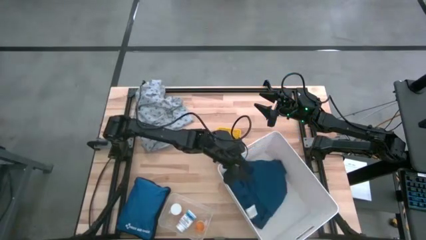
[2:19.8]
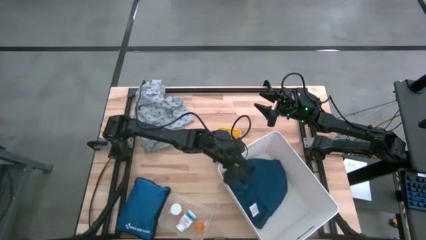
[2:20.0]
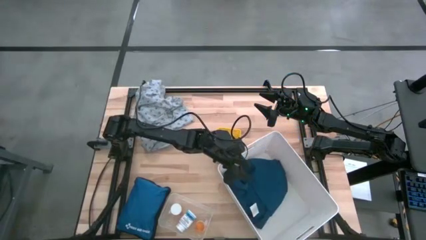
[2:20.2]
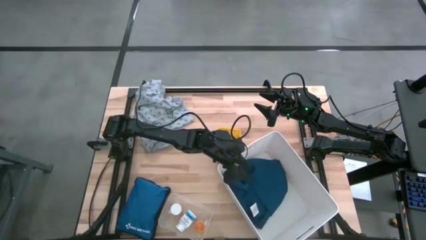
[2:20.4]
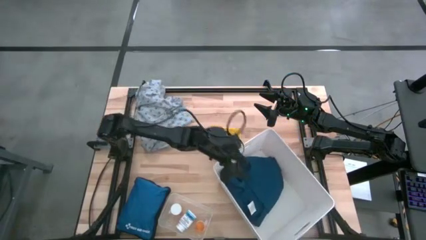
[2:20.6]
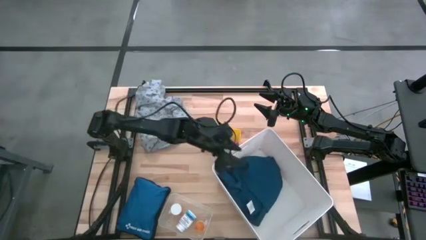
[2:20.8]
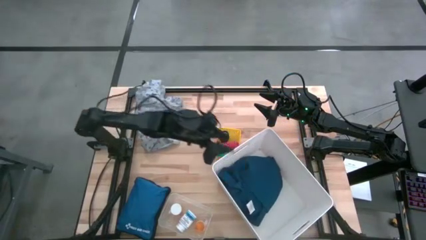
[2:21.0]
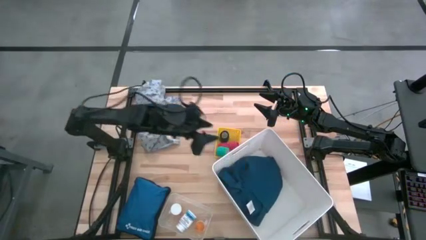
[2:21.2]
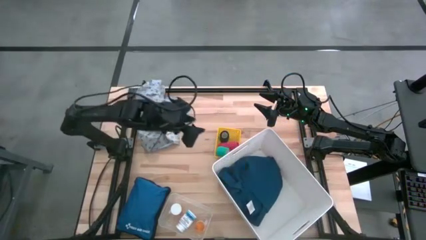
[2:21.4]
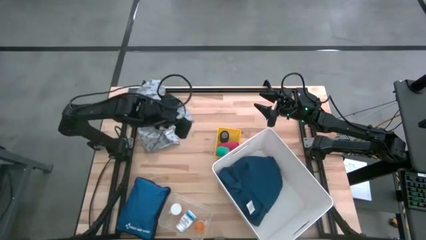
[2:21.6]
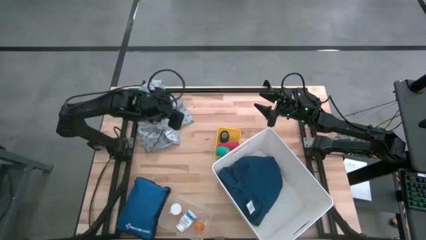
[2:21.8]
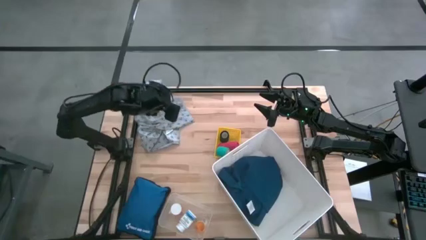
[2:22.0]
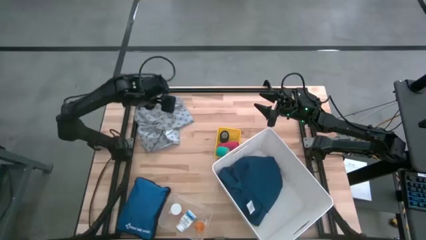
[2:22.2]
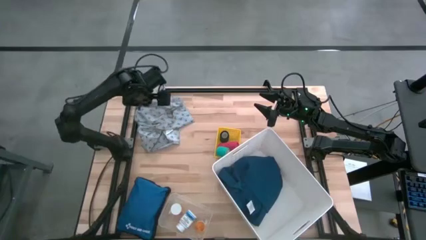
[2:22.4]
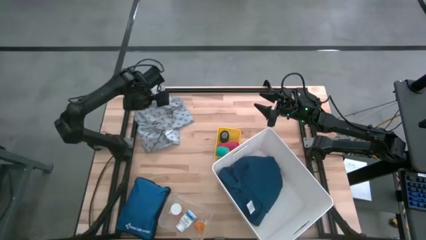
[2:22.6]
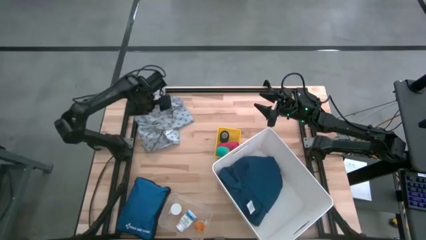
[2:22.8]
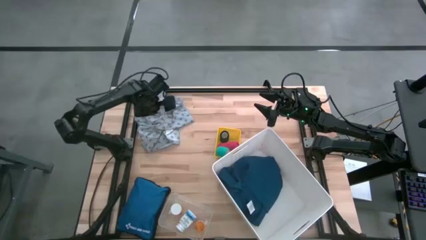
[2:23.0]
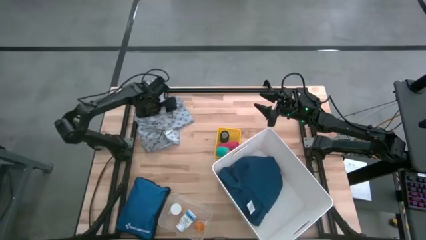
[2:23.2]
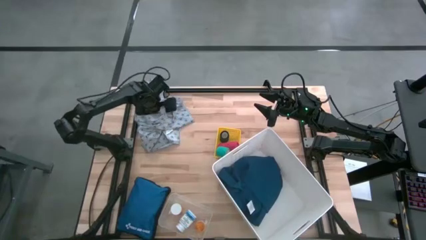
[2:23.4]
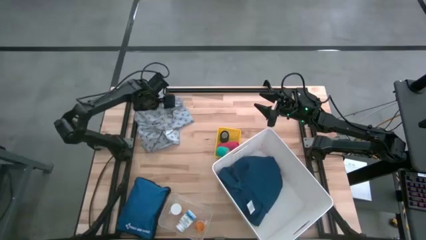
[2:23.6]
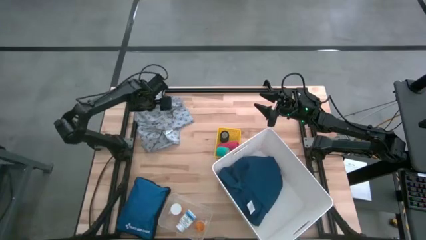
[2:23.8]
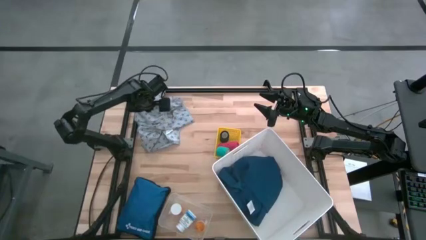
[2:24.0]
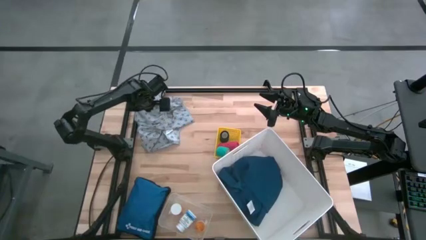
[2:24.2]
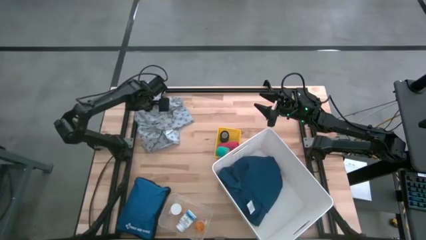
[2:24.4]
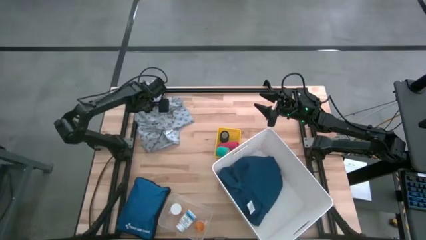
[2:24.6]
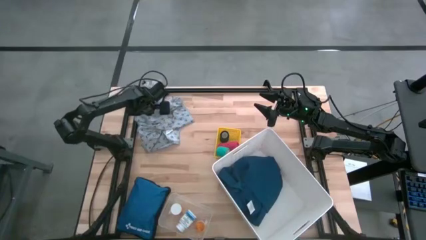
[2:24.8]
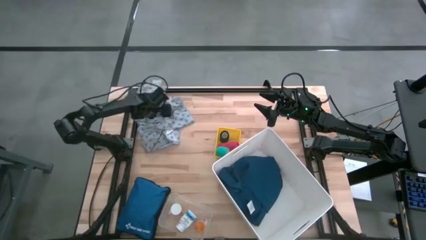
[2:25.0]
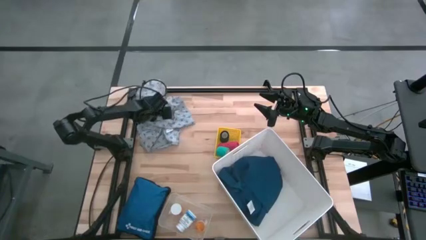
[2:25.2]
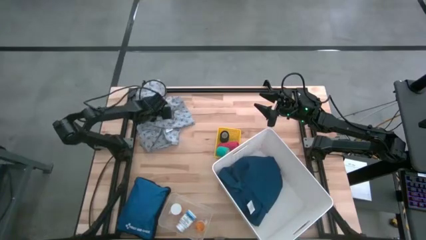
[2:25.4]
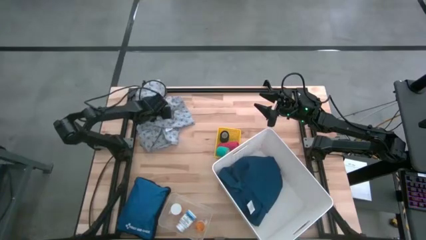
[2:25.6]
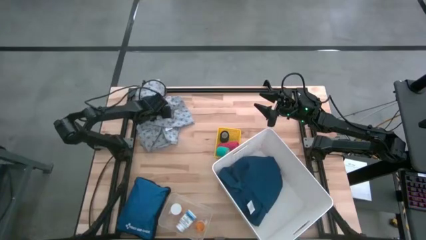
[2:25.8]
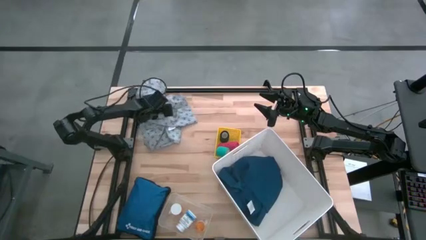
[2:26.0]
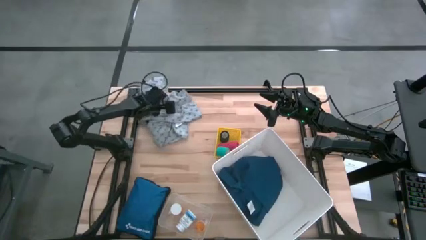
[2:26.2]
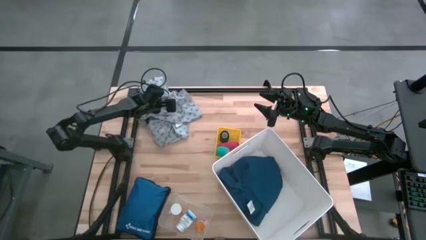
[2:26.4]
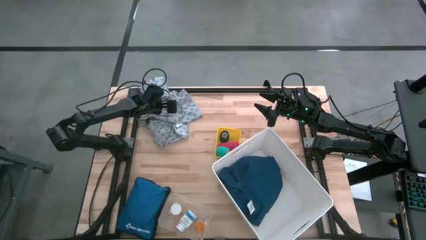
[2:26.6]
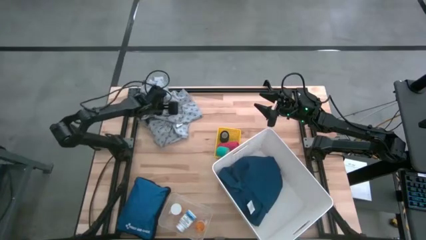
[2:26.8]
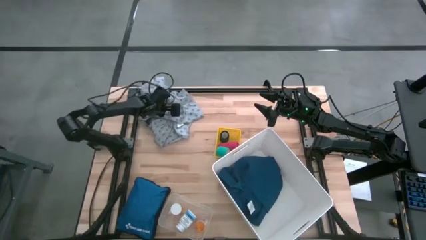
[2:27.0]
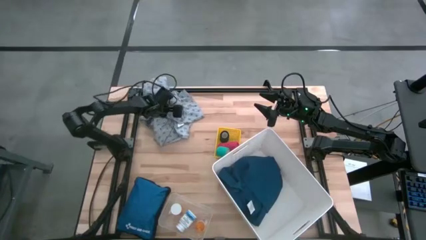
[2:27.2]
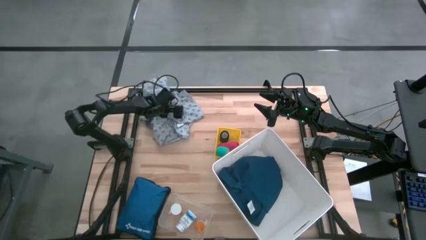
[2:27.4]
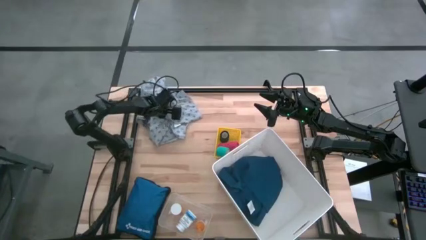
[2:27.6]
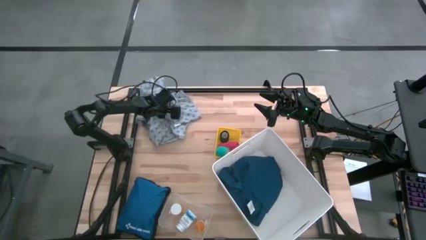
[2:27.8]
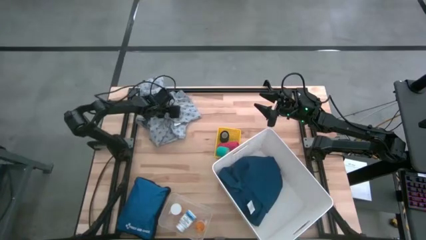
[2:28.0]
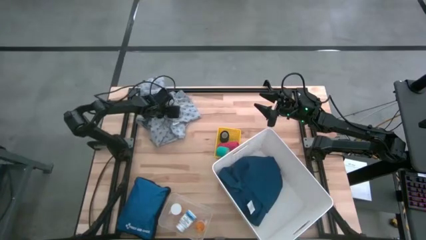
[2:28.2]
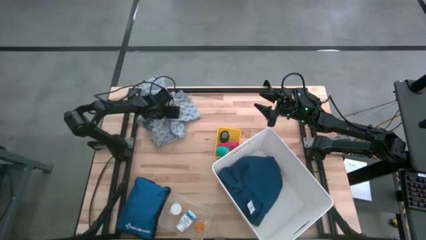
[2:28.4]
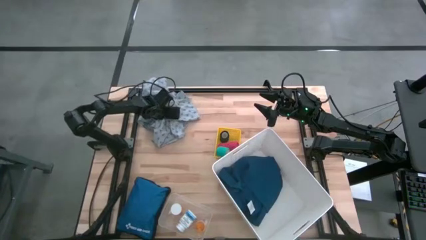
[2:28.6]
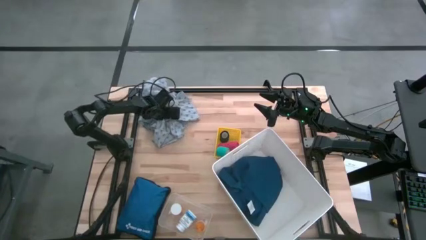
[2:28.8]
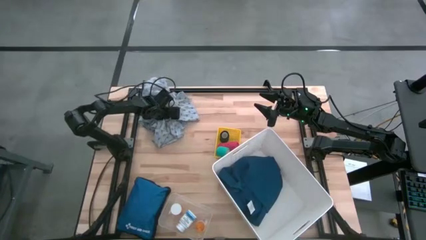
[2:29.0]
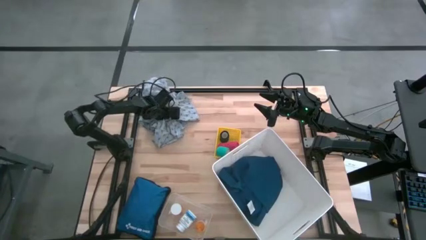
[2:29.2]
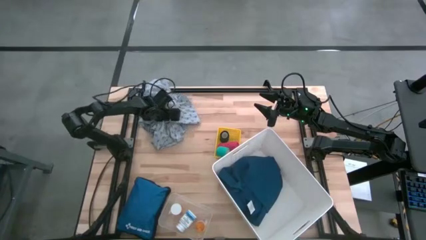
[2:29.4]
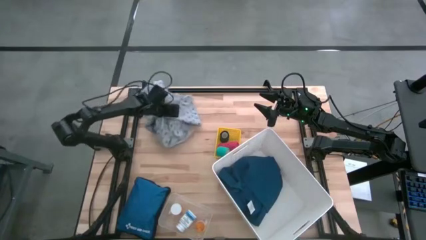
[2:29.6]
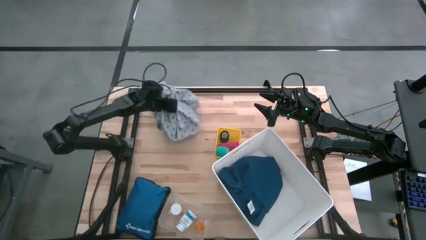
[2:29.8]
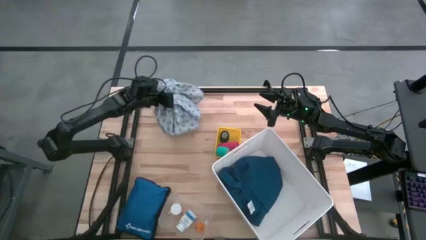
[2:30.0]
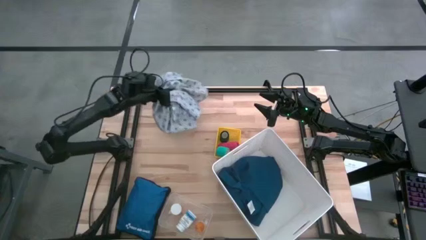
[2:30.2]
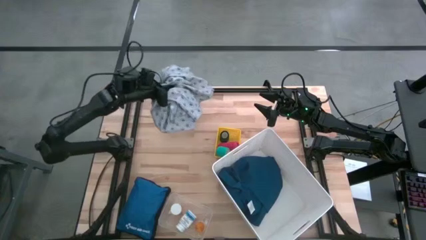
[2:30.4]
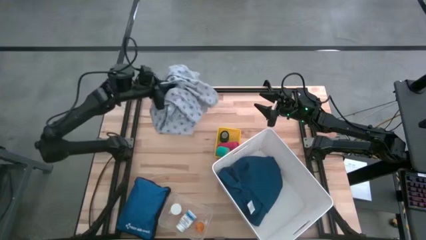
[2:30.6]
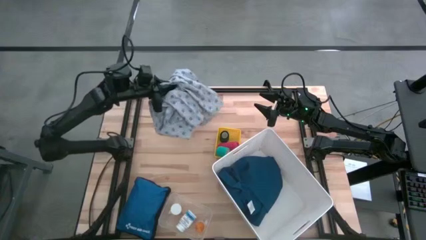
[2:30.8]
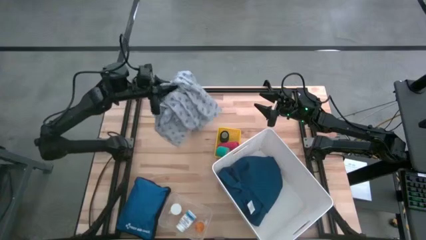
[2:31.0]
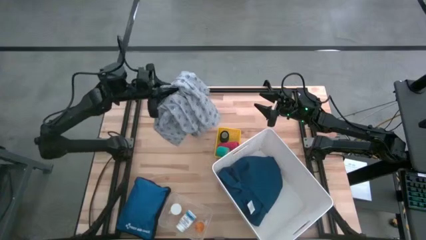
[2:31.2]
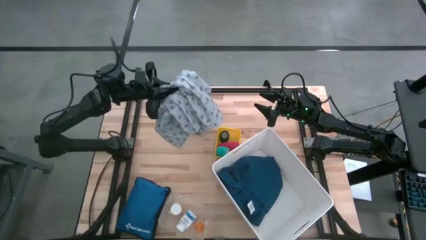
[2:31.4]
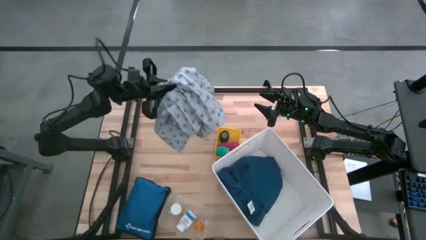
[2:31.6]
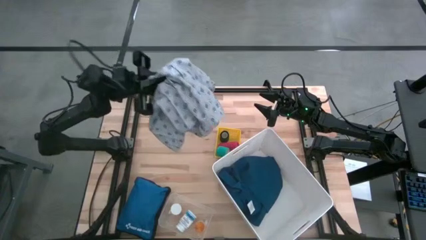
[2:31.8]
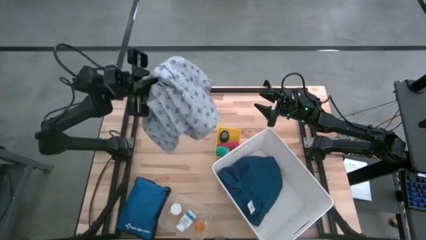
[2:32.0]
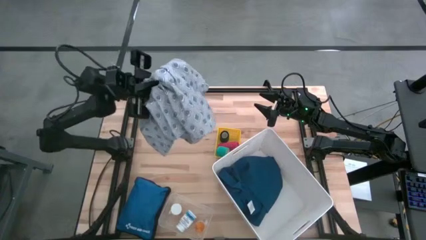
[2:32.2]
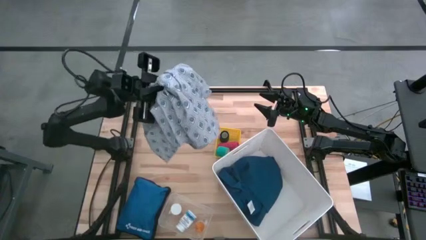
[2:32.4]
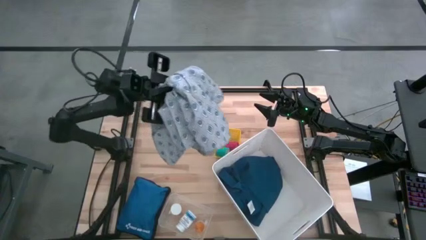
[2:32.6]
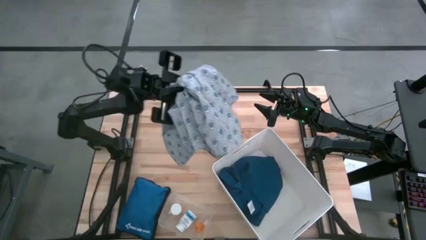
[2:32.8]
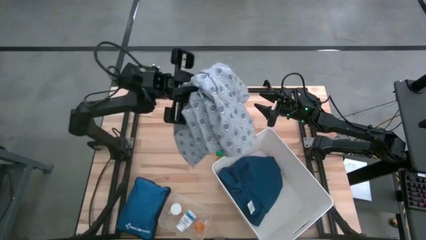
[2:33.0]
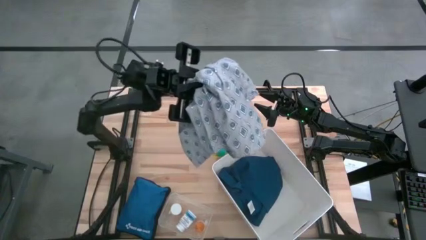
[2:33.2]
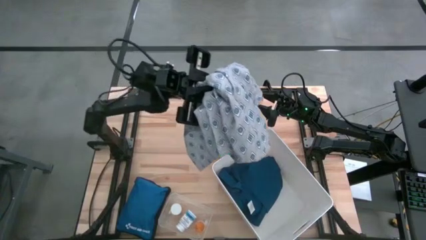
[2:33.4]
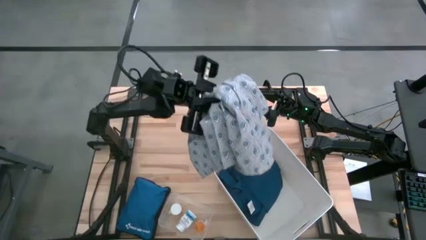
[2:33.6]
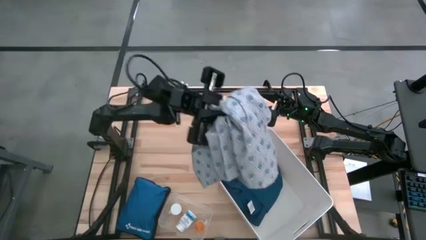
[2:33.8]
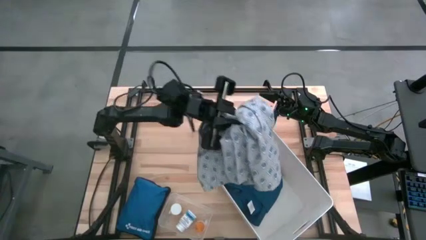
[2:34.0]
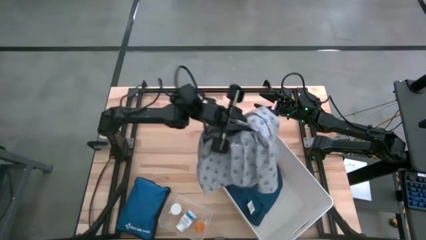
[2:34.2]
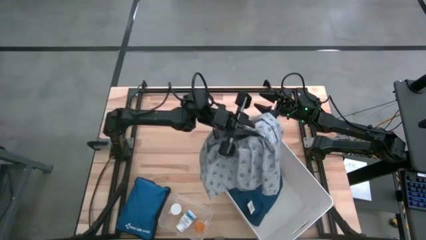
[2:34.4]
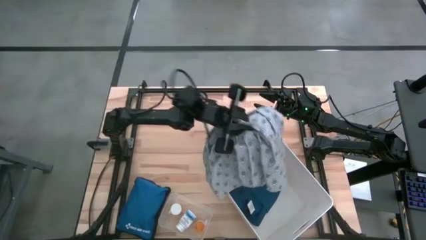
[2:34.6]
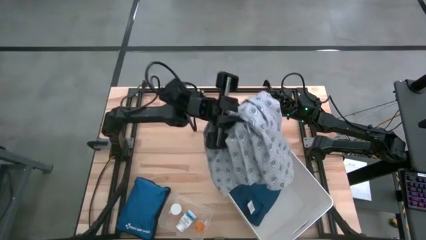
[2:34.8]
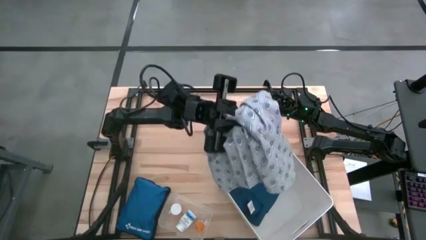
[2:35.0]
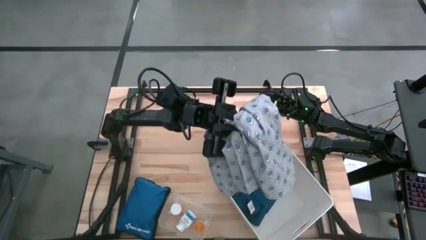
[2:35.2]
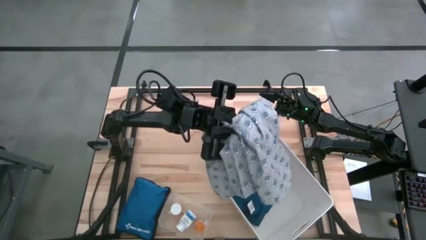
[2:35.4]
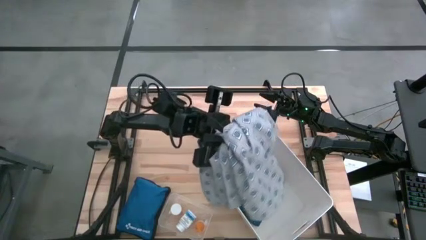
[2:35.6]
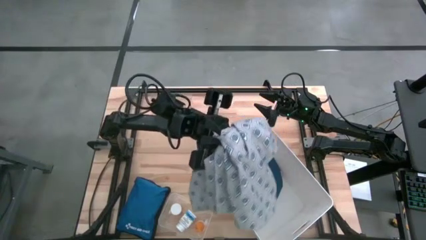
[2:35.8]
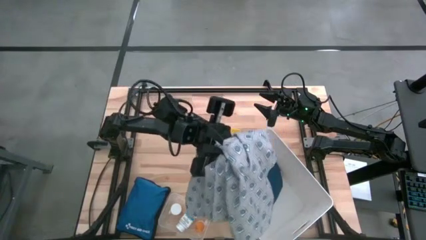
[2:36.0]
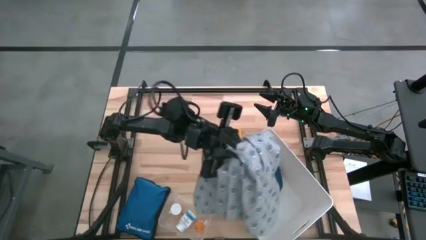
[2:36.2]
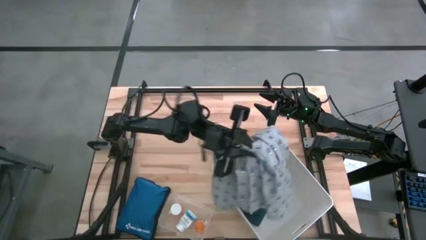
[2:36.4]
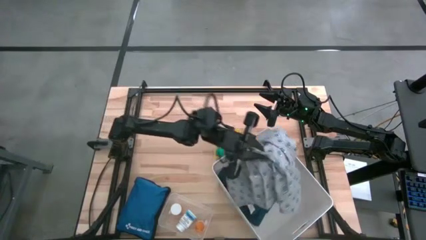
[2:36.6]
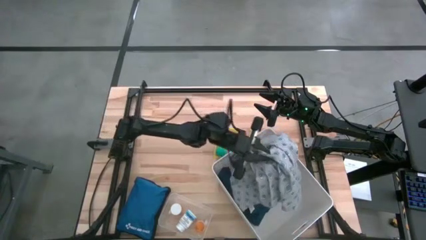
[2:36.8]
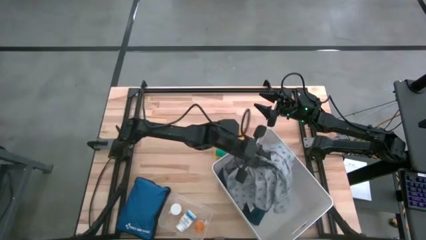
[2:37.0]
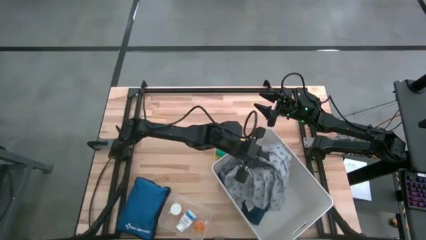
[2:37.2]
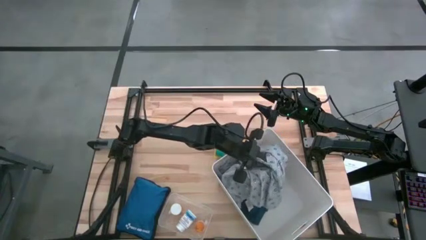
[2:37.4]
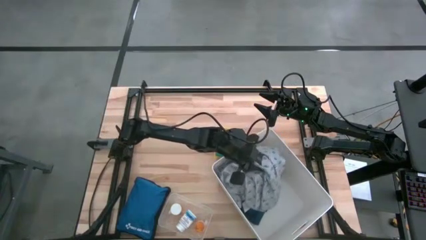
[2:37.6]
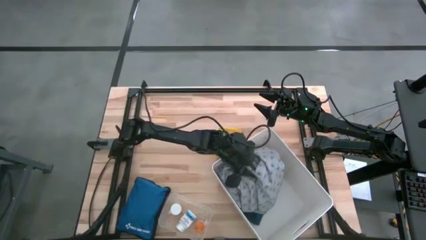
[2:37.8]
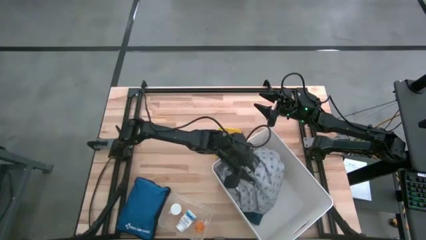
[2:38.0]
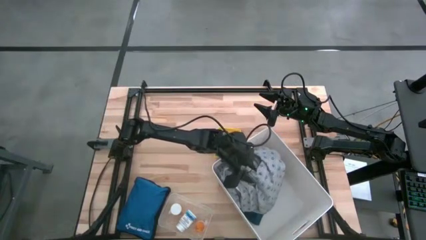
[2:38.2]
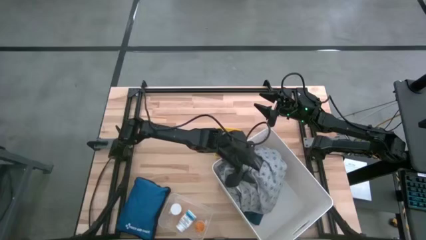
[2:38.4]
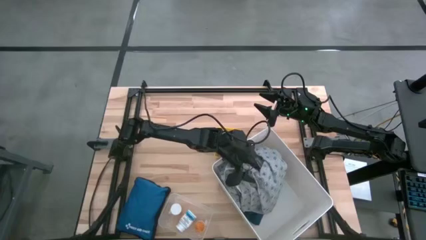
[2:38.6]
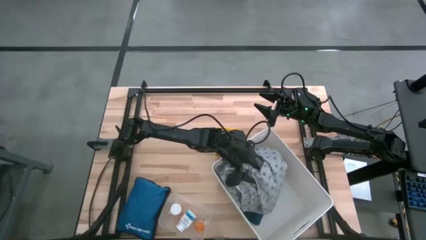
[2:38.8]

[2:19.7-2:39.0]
Task: Pick & place medical supplies in basket/bin
Put the gray patient gown into the white bin
